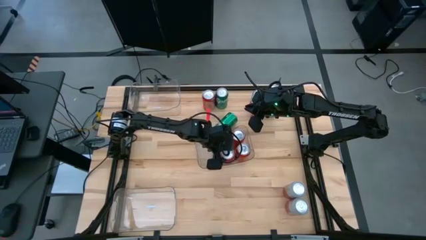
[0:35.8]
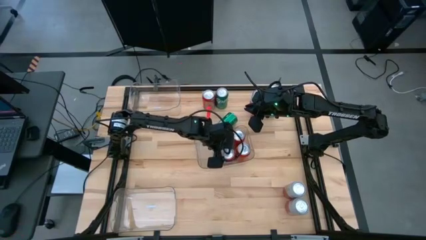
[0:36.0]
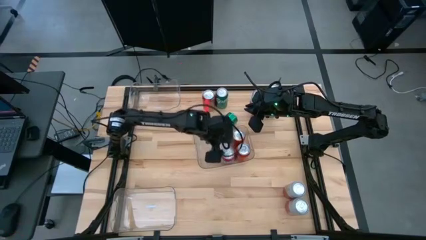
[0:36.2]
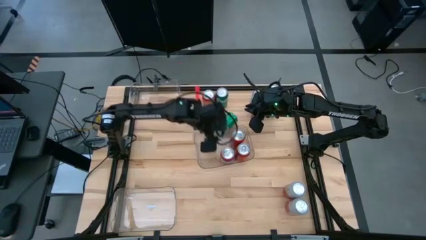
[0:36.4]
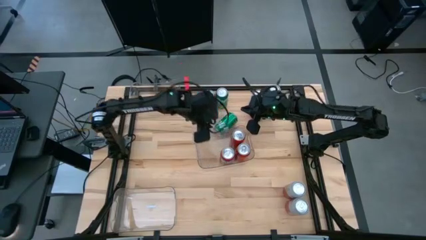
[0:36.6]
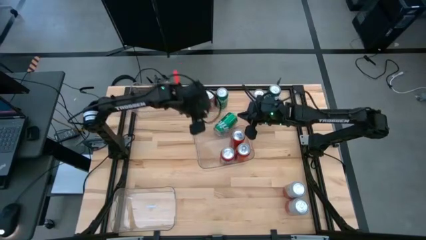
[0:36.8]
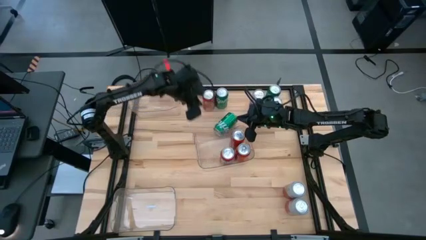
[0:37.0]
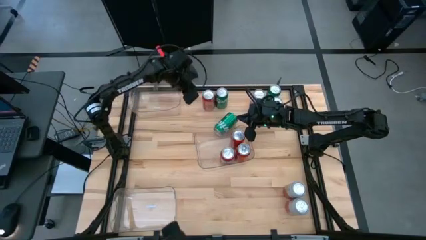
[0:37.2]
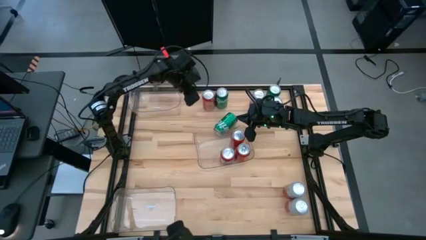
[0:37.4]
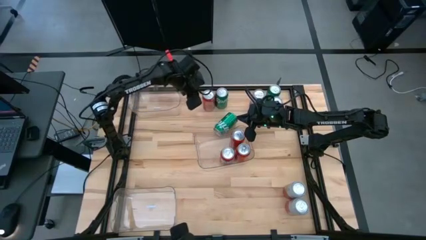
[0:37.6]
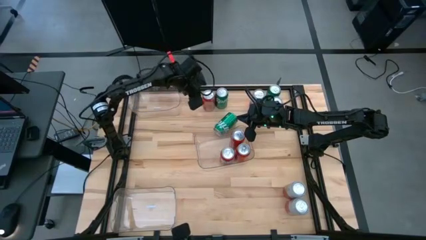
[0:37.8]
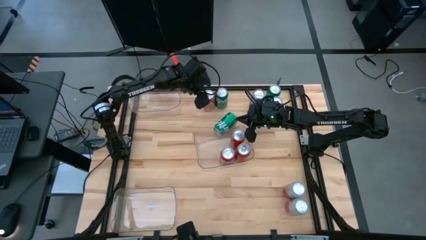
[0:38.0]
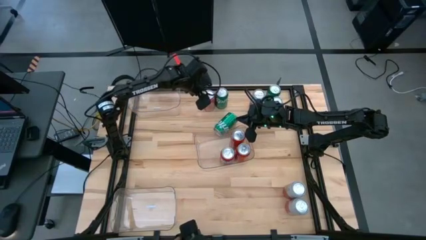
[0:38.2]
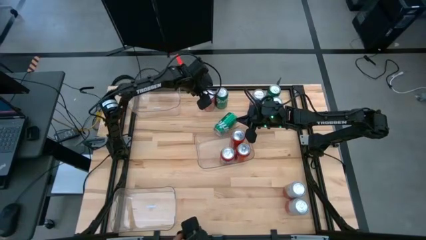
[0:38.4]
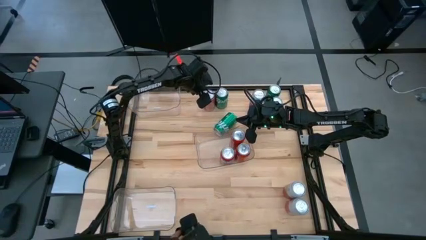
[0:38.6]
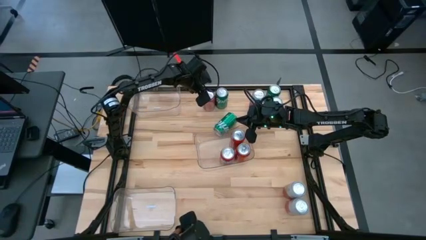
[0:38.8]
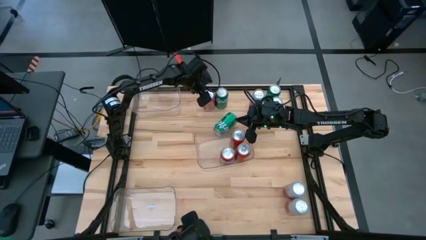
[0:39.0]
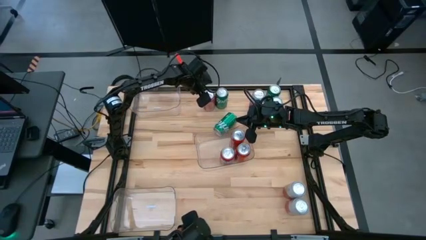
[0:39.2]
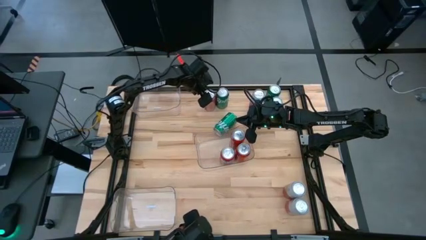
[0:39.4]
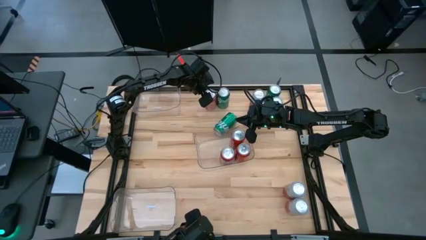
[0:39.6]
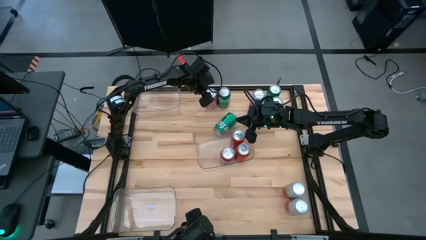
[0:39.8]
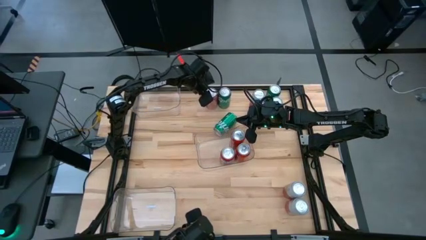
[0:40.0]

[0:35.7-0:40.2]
Task: Sort soda cans
Put the orange soda can into the middle transparent bin

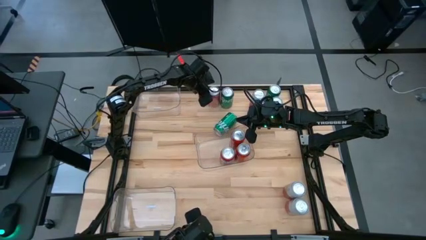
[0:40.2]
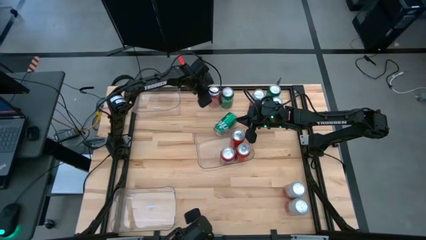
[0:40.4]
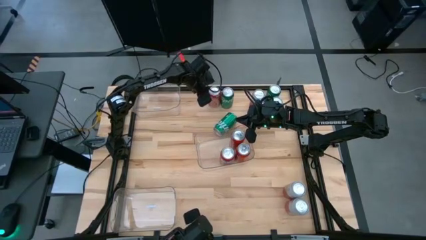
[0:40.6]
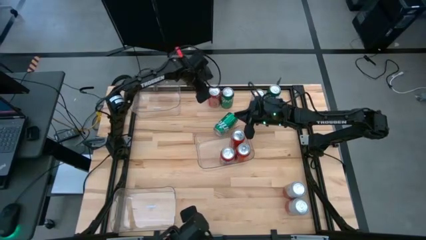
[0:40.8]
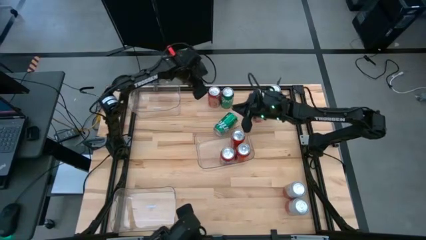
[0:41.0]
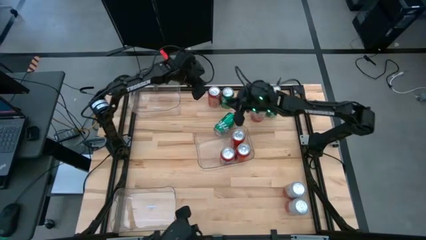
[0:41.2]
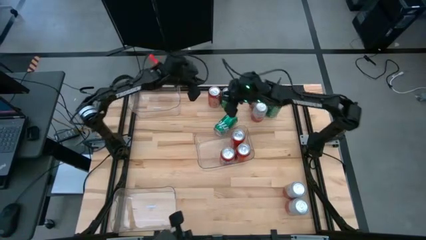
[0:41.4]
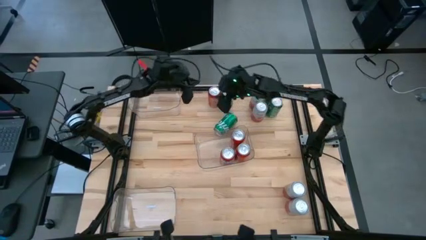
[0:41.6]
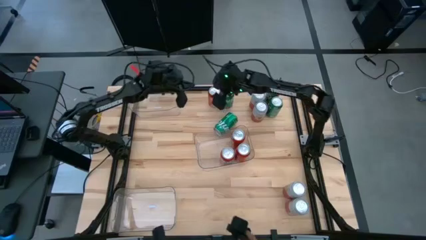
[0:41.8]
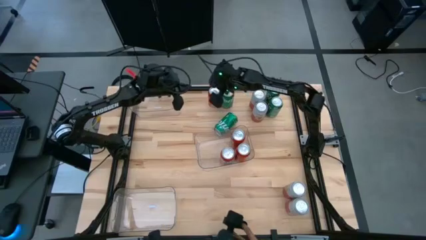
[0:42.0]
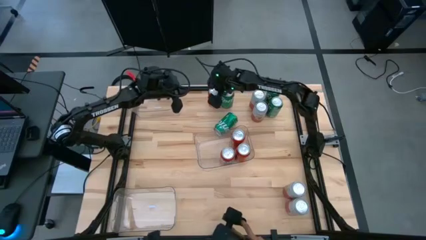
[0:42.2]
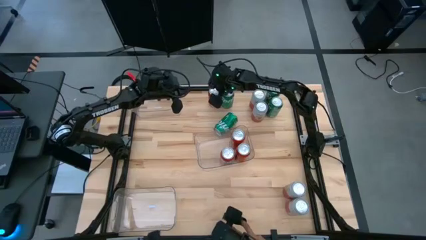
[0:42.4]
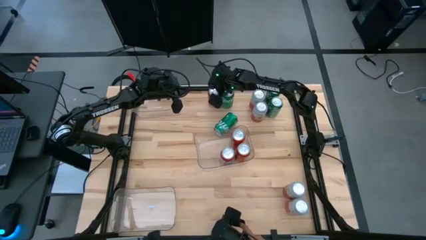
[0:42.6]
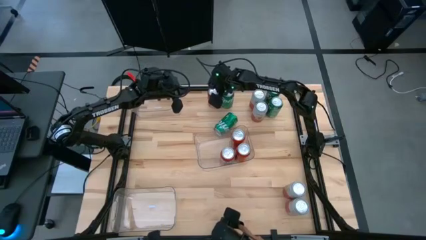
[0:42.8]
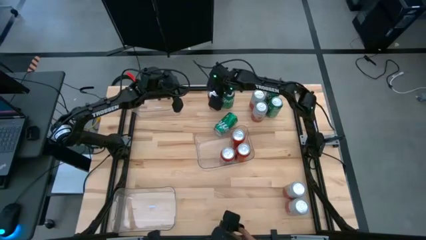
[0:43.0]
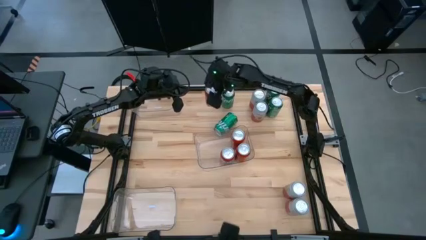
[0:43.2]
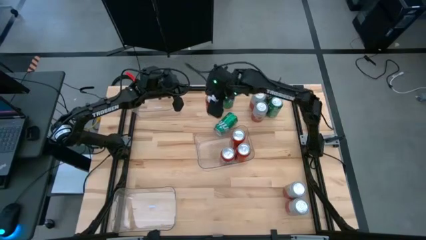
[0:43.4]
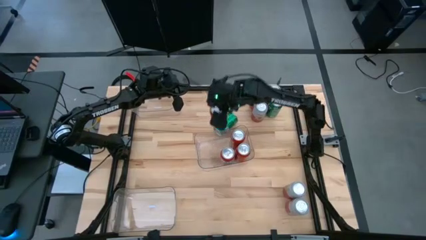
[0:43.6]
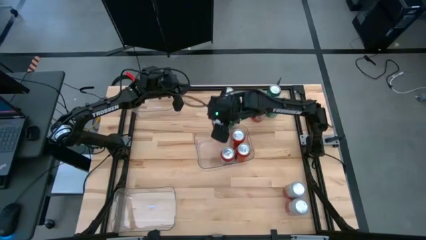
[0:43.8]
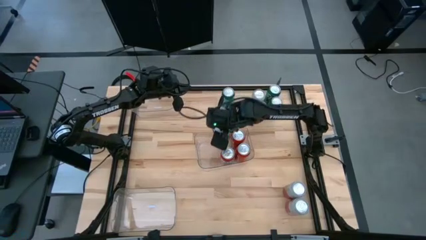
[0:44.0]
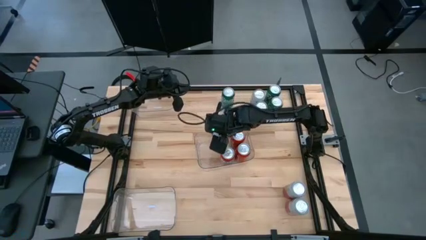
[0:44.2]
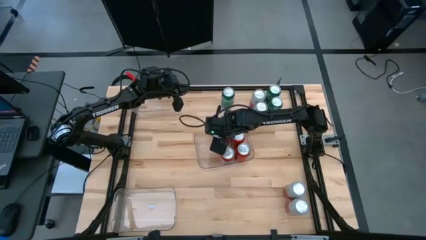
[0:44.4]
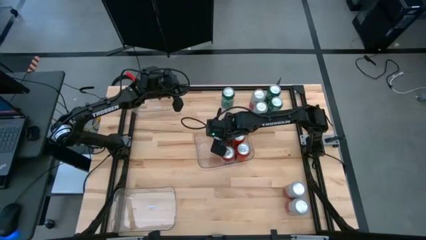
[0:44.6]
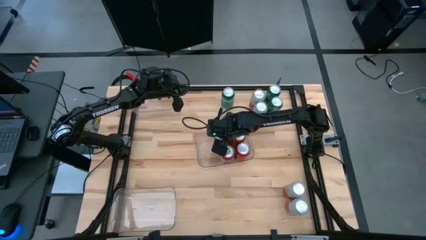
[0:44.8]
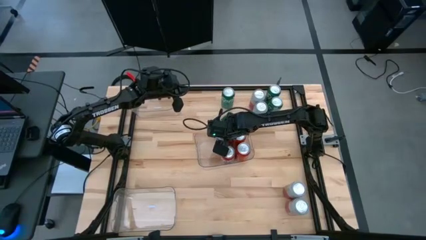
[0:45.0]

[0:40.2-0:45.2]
Put the orange soda can into the middle transparent bin

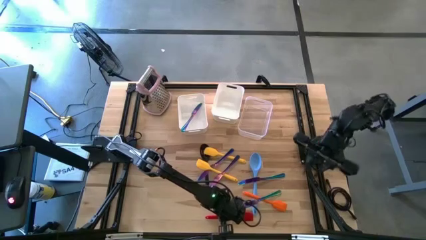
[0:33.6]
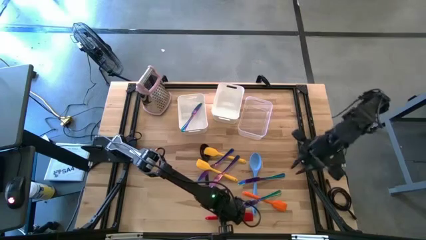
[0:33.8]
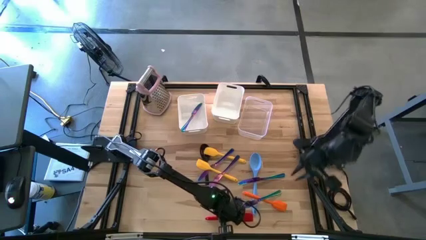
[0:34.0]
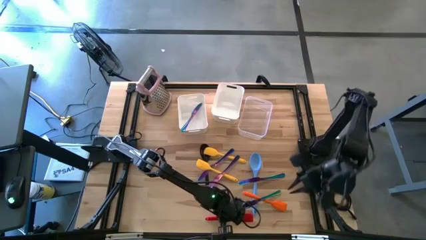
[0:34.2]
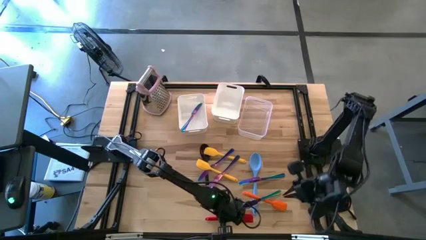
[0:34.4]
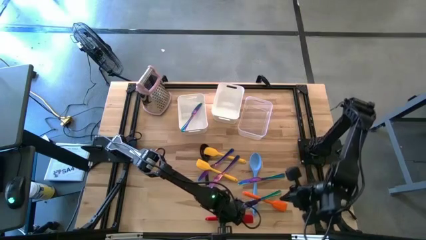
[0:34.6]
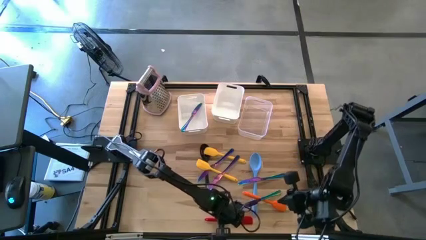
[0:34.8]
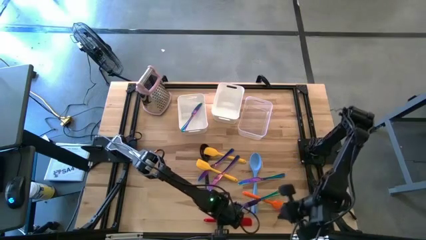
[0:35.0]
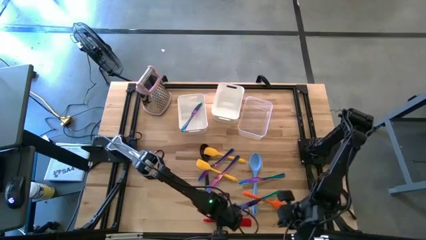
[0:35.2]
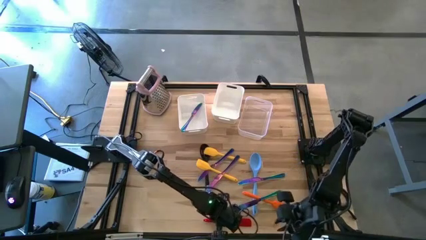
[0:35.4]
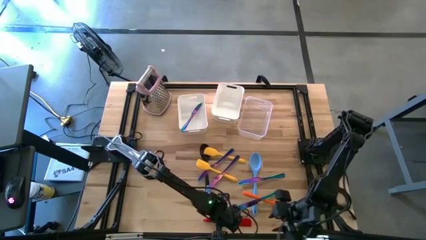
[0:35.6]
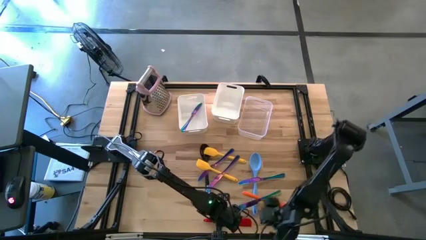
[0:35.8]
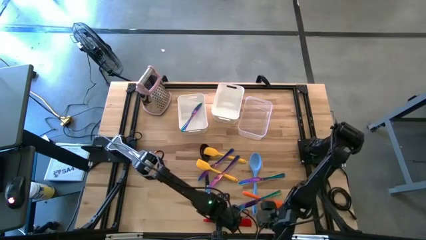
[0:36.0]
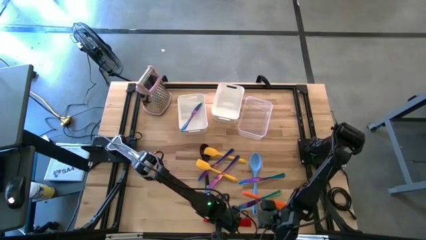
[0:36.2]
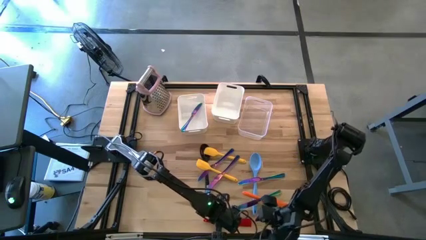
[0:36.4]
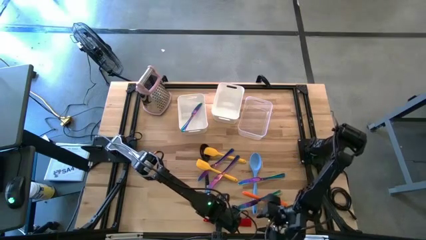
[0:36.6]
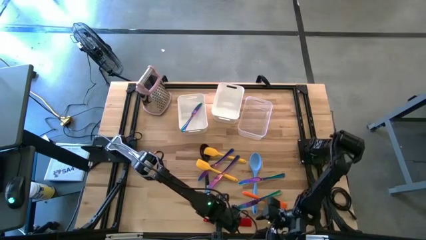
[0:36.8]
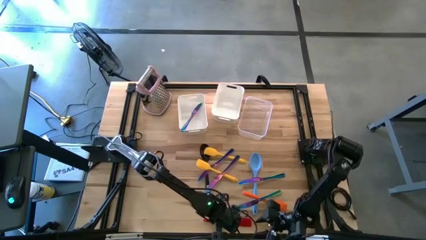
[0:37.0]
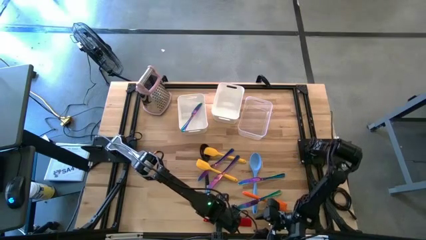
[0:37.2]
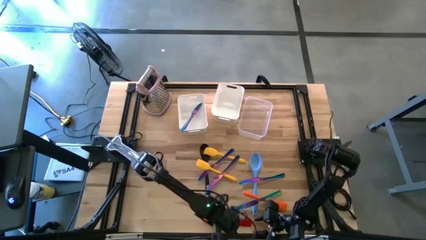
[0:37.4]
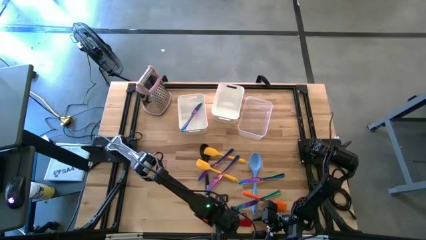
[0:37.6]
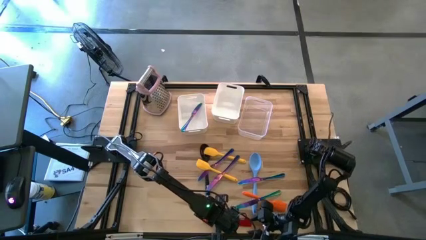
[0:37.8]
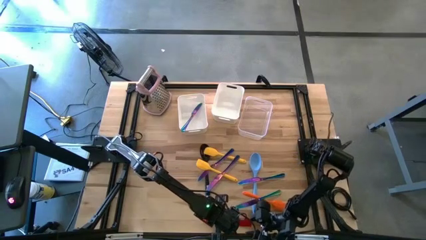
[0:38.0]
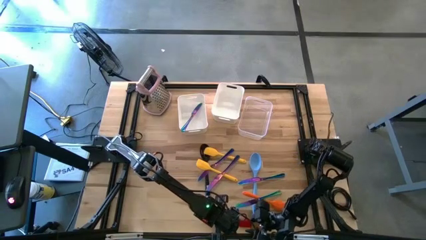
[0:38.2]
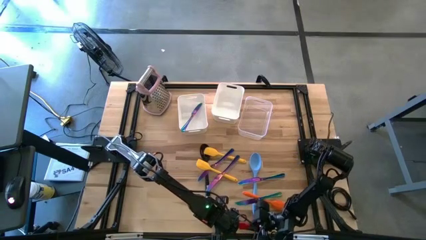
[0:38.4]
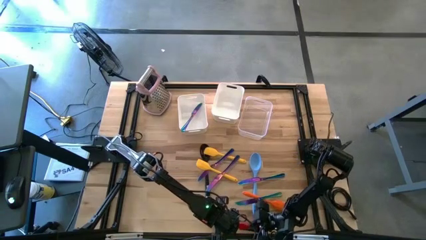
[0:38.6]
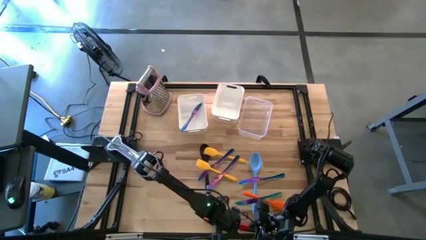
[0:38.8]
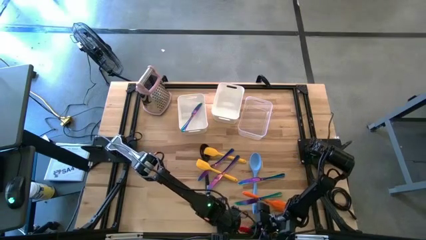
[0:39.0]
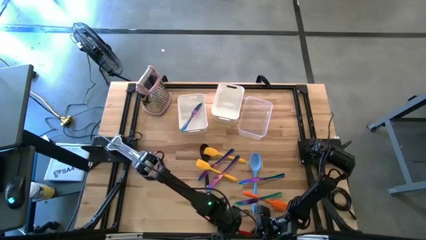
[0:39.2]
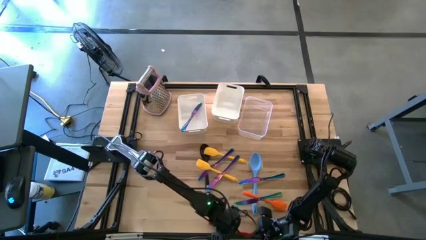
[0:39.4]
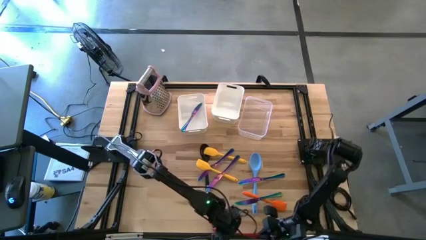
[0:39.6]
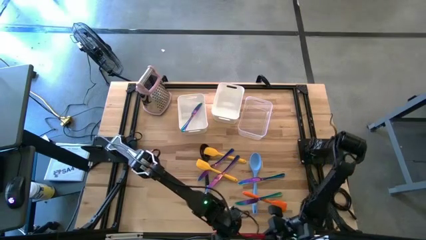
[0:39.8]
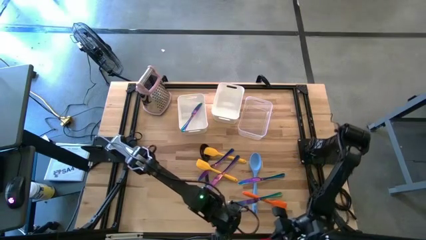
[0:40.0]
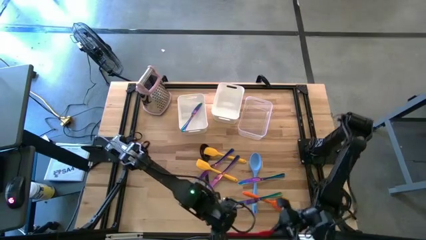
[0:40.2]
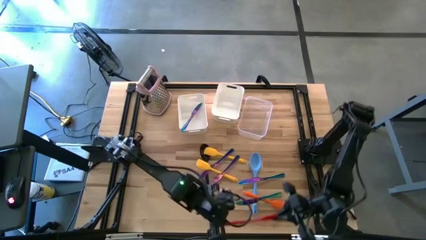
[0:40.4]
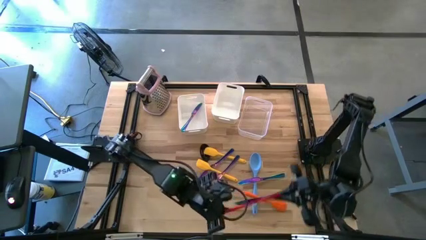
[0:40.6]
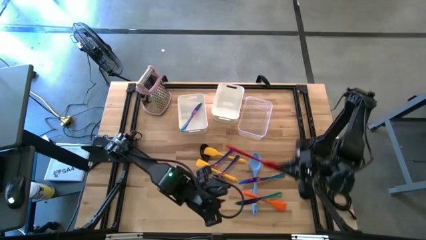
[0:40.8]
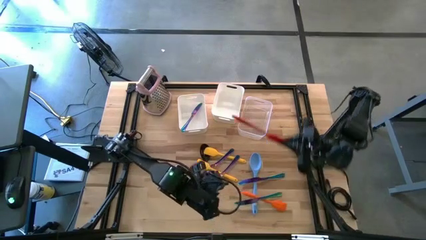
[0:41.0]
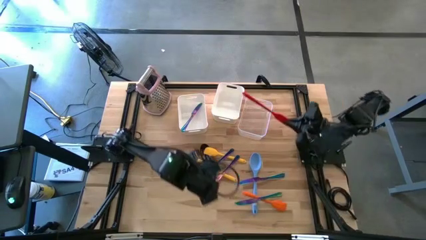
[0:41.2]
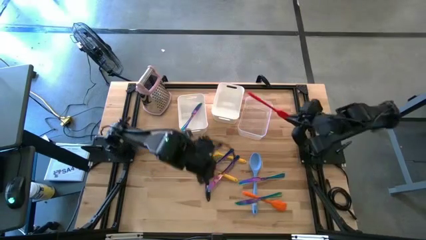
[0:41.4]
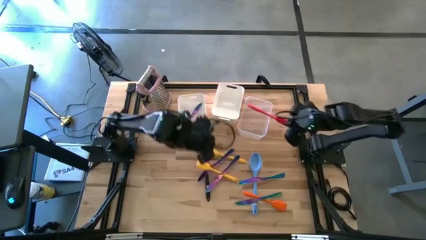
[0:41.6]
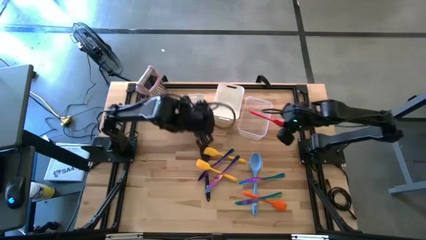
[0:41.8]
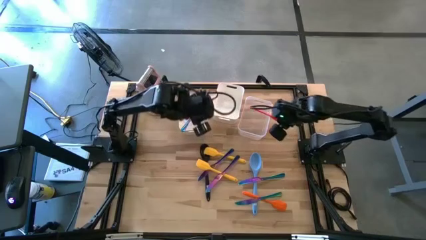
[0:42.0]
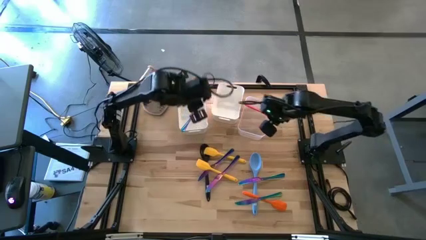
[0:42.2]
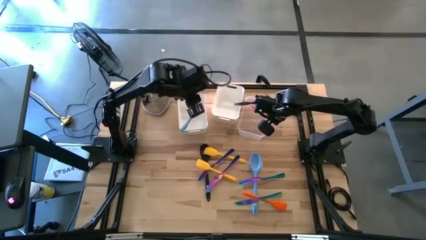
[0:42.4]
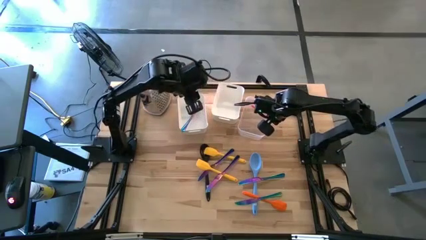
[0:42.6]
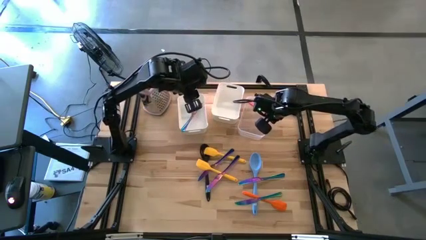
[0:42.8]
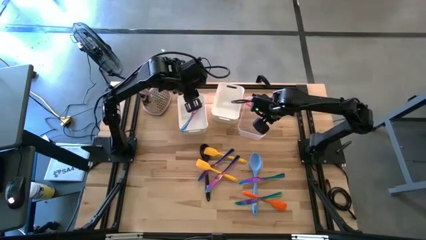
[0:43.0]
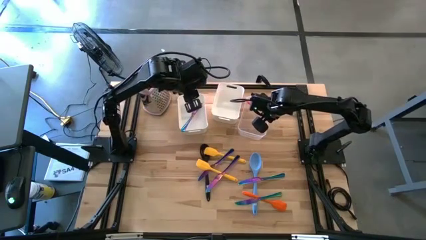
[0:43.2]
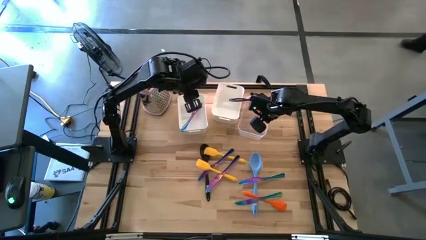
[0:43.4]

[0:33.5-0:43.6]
Task: Pick & Place Kitchen Items
Put the red spatula into the transparent bin
